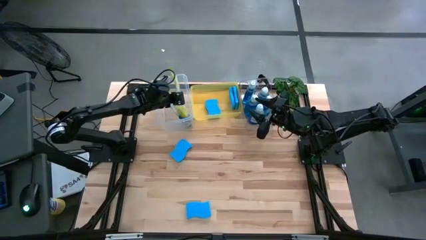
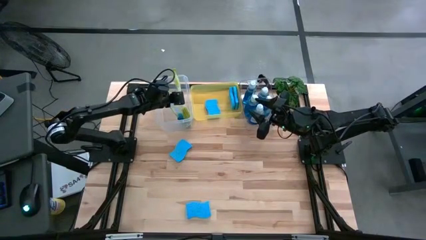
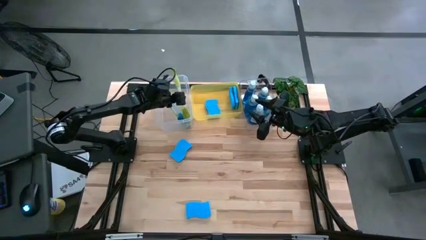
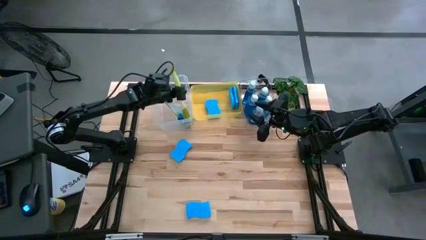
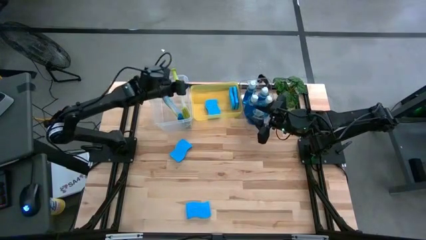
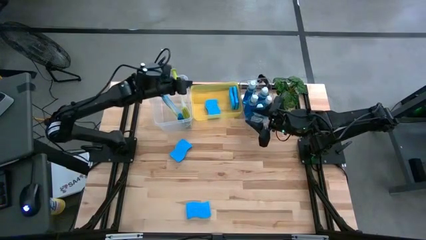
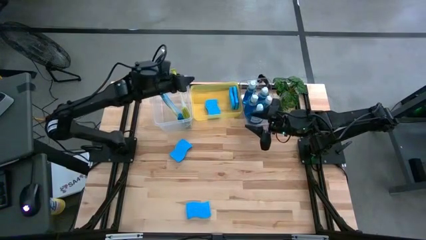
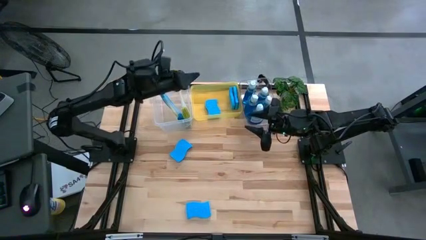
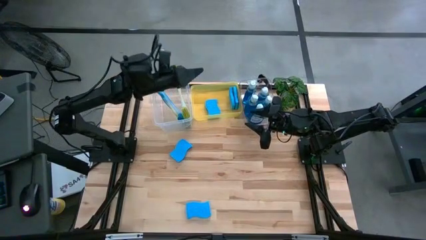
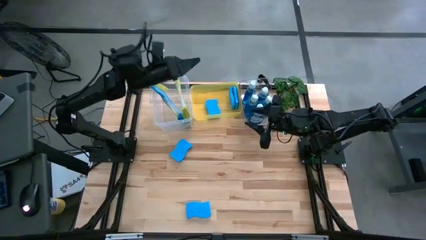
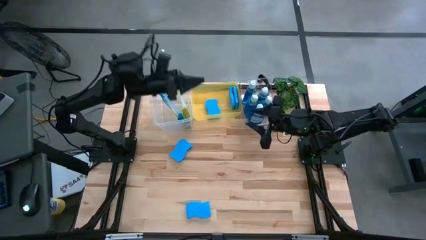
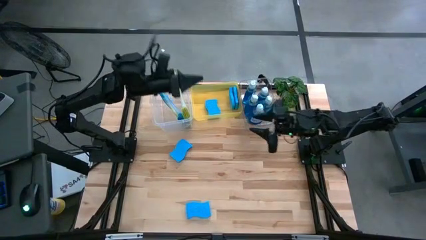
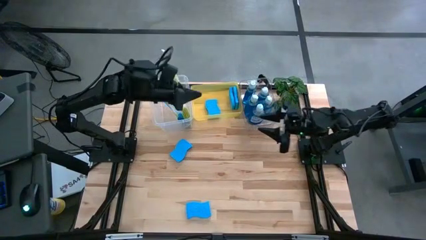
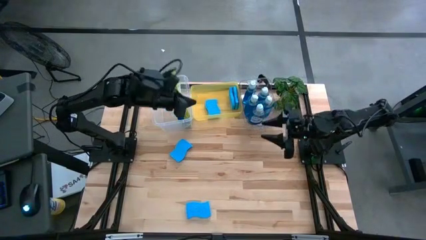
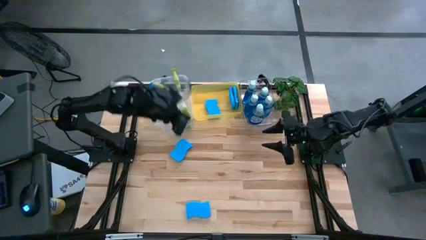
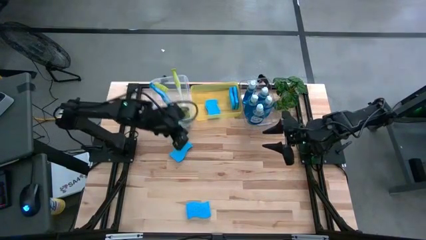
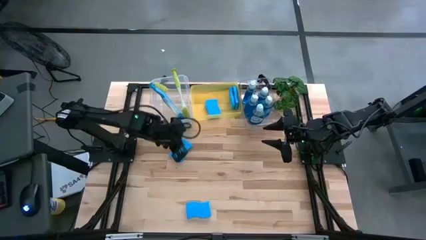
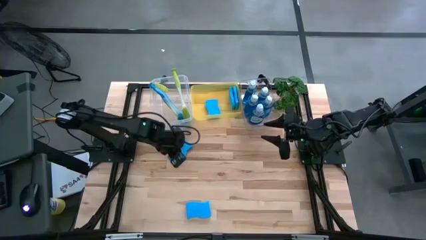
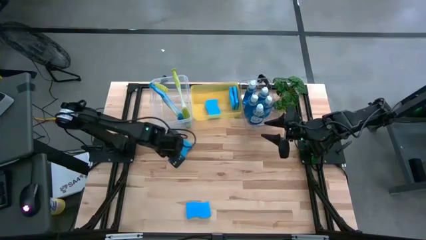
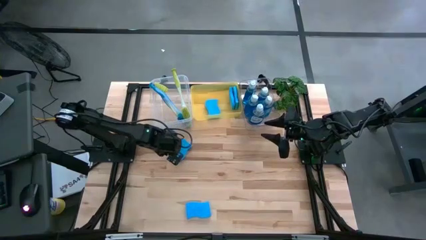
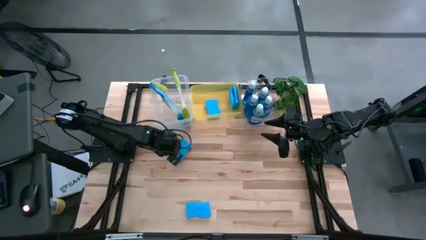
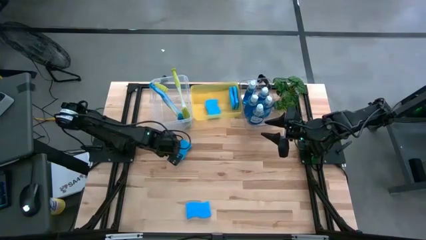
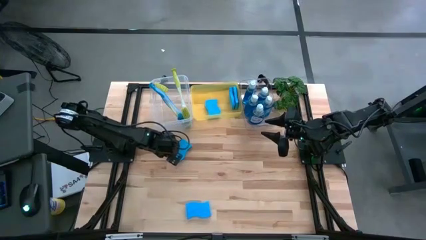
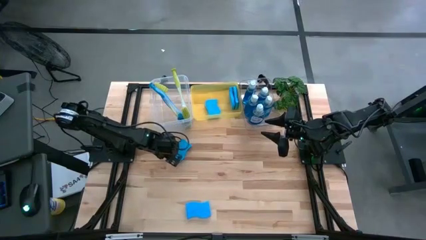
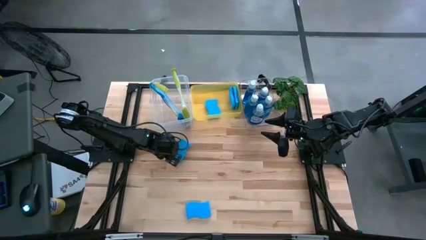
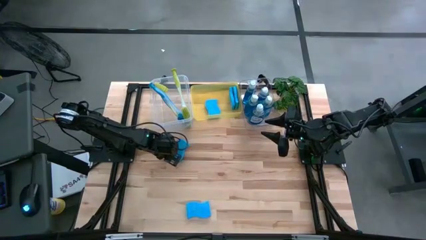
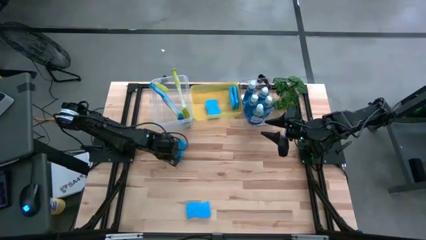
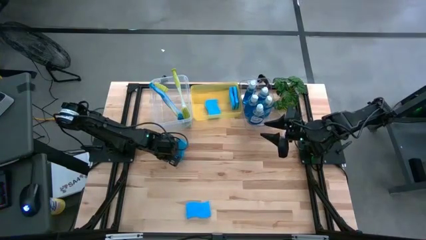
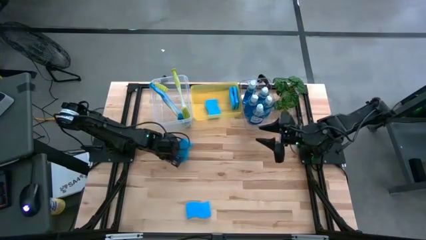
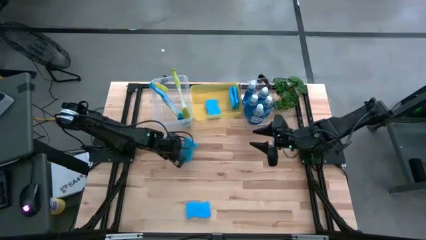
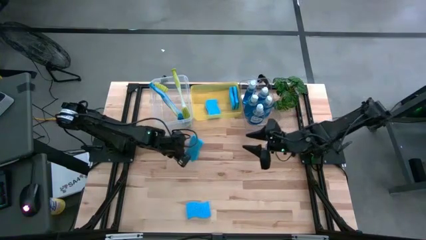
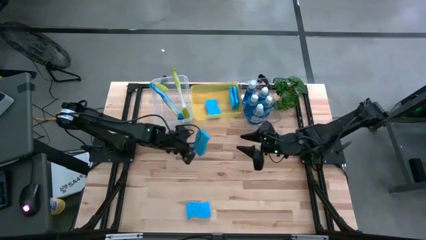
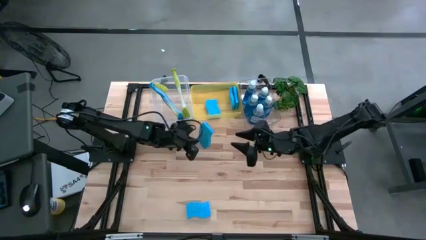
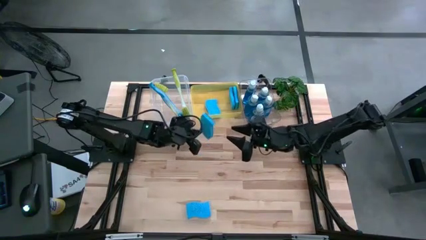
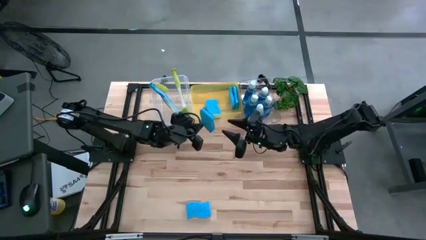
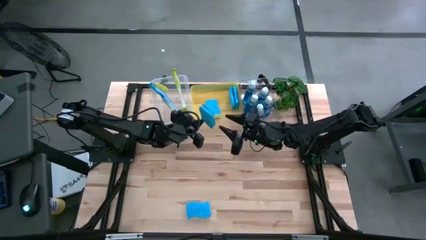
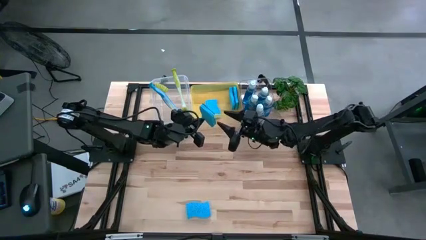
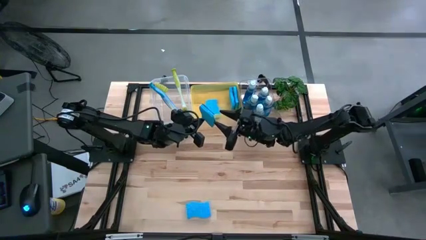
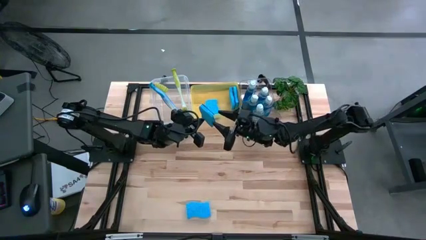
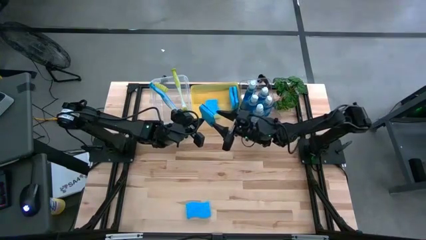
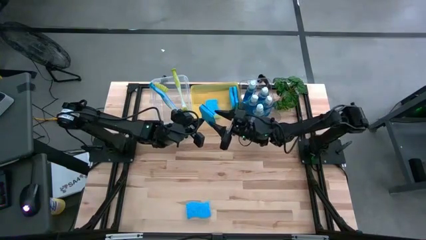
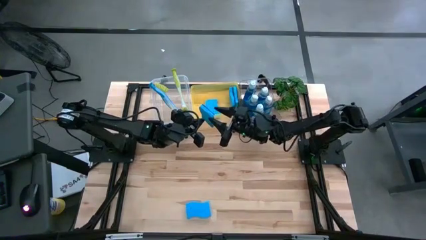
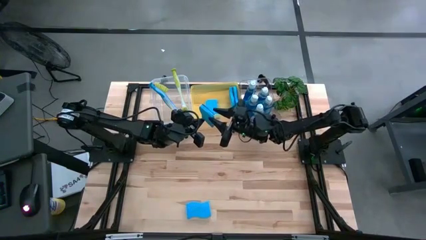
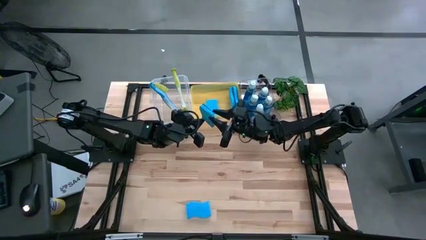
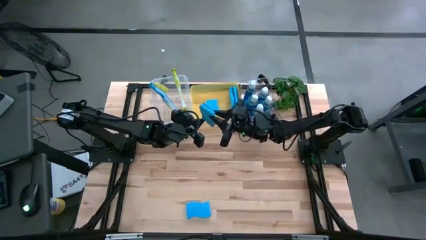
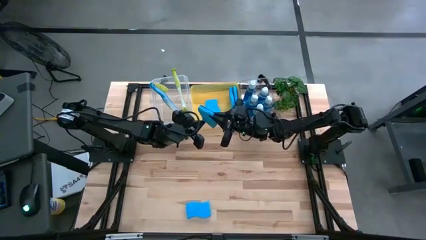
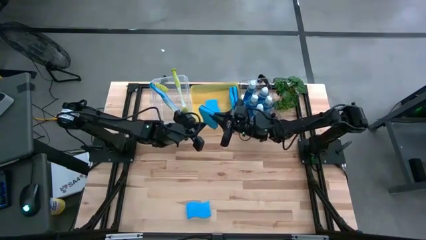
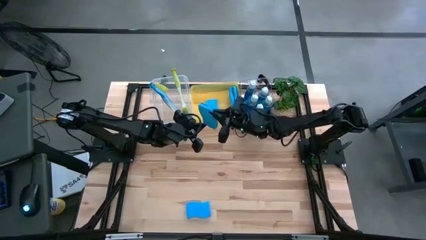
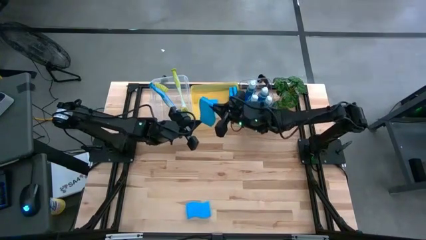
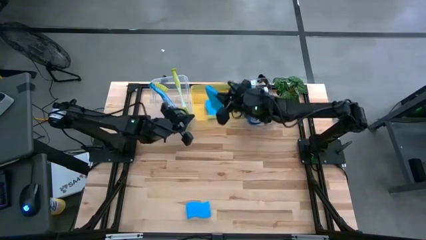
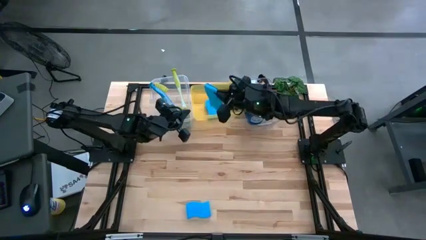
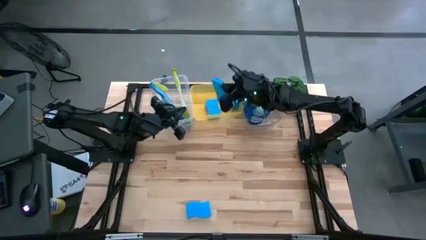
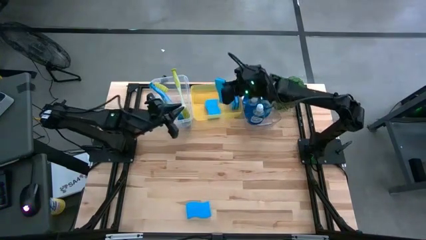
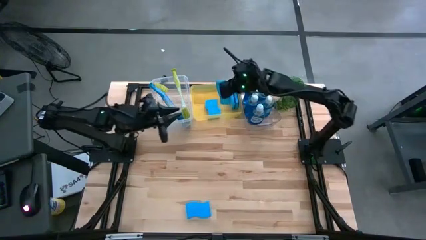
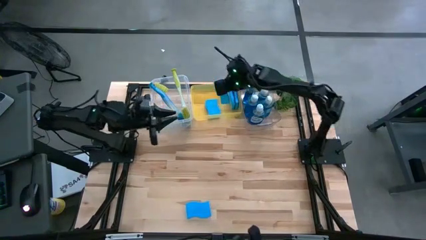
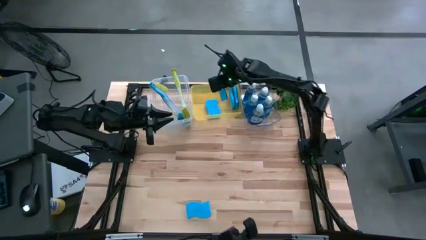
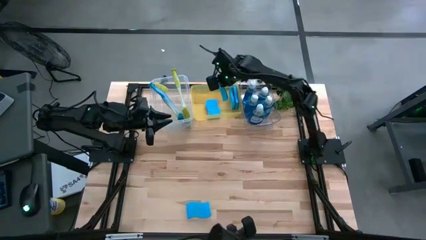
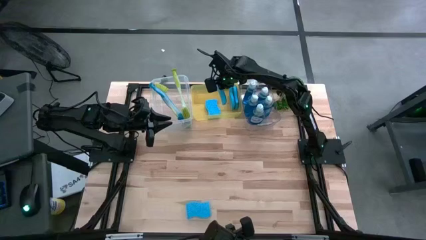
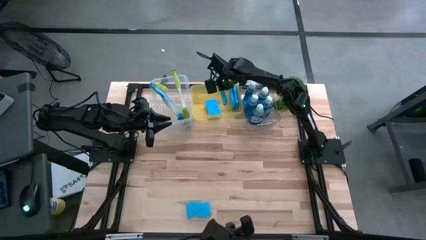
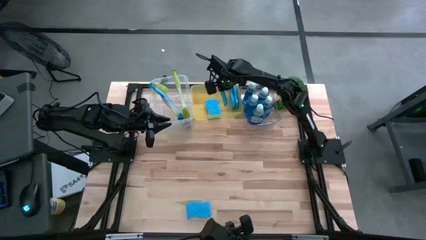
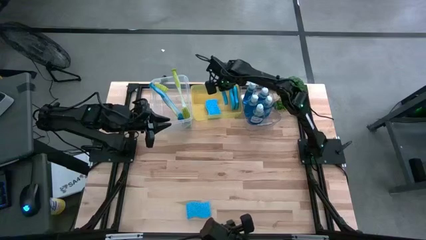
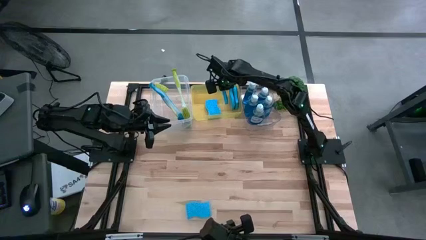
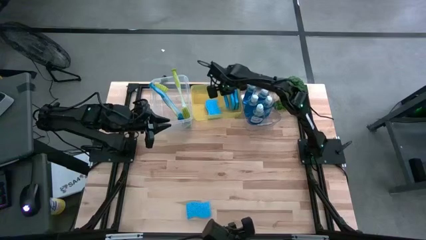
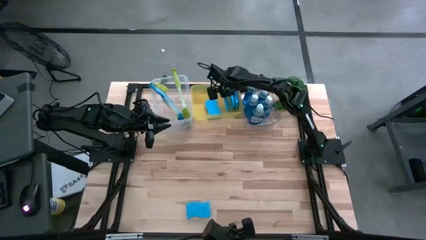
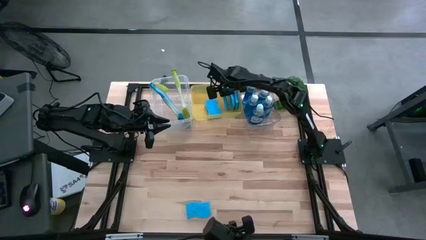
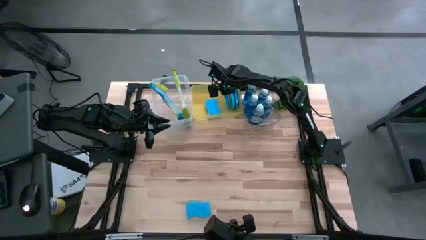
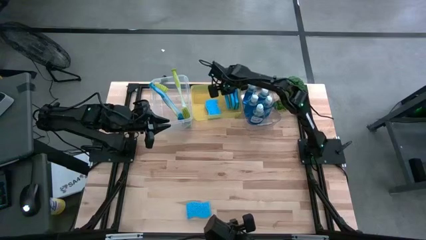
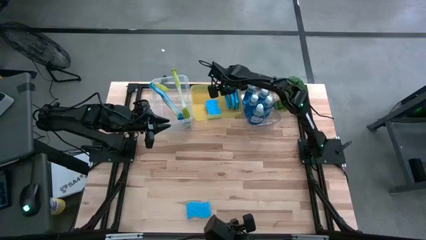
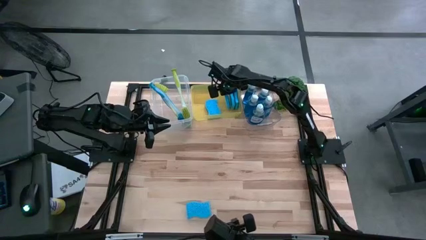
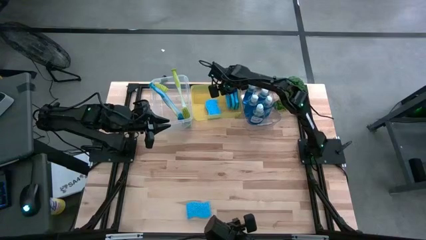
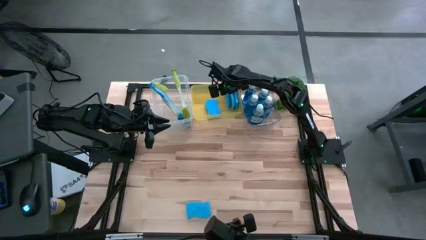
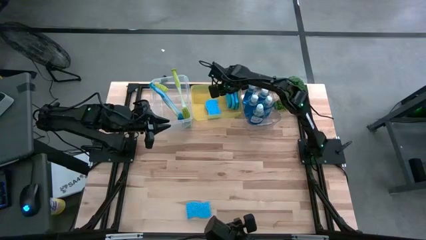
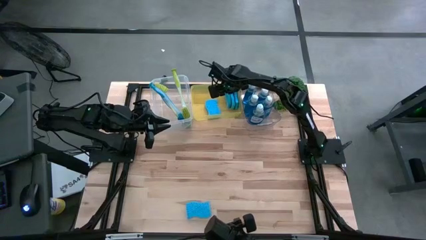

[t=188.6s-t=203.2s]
Task: Pick & Place Kitchen Sink Supplies
Put the blue sponge into the yellow bin

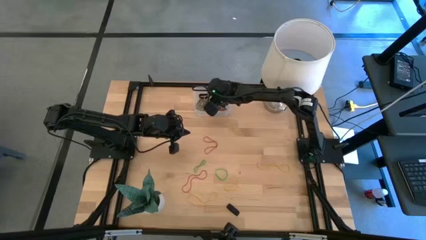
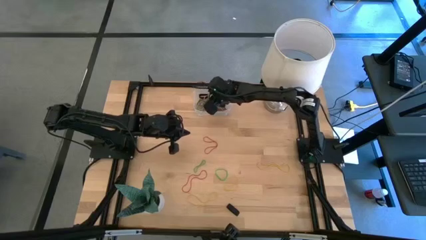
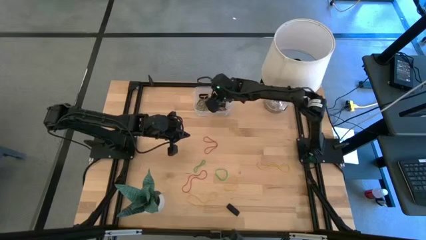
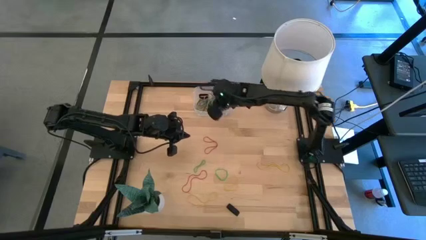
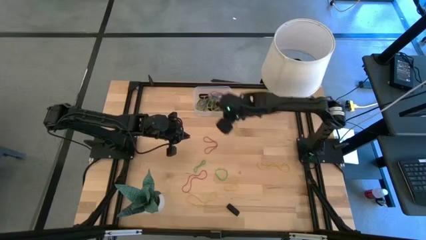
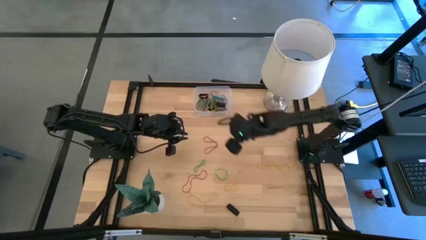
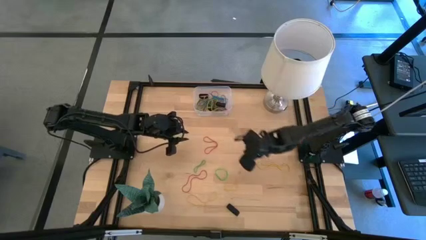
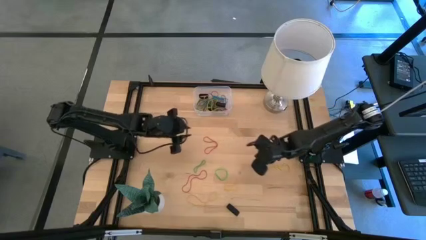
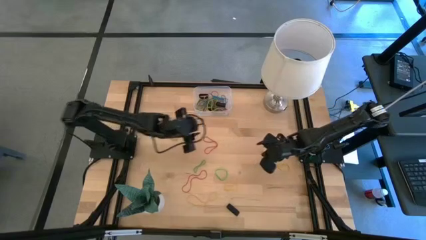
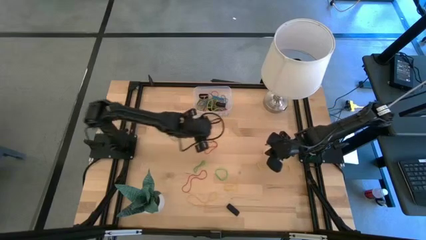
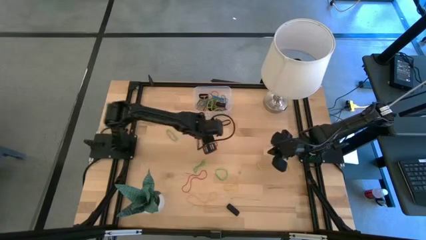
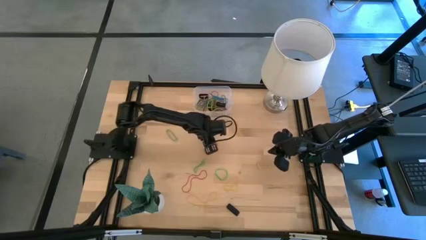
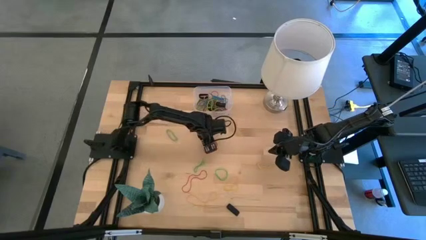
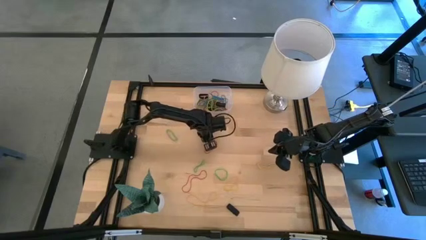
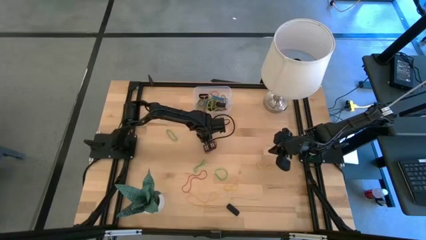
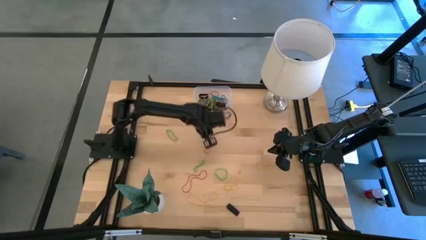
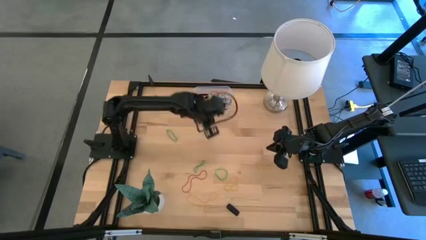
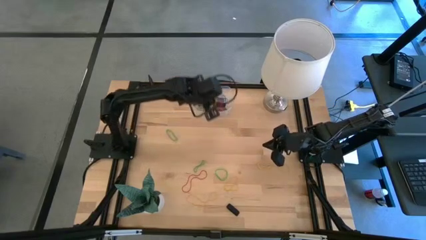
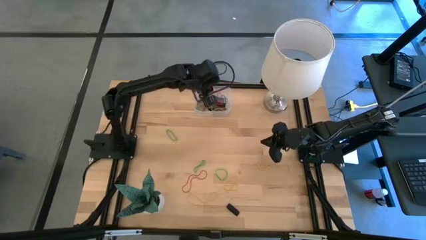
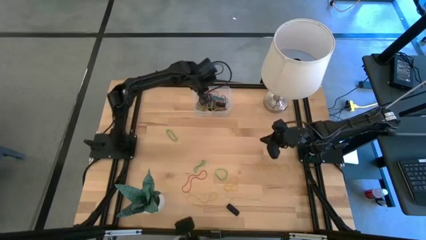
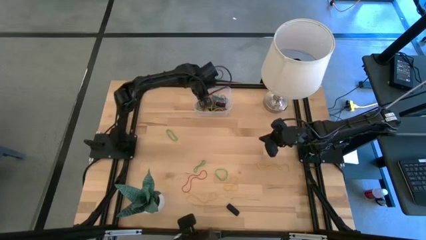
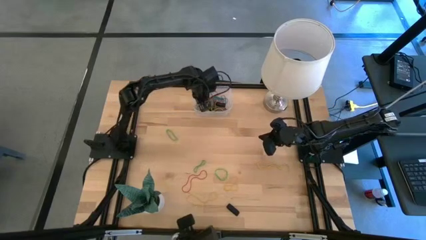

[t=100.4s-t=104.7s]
Task: Pick and place rubber bands into bin
Put the red rubber band into the transparent bin
